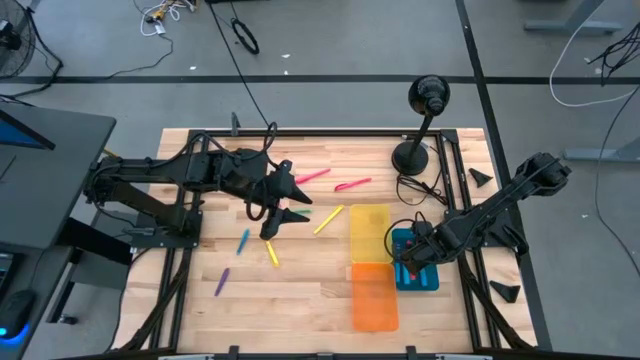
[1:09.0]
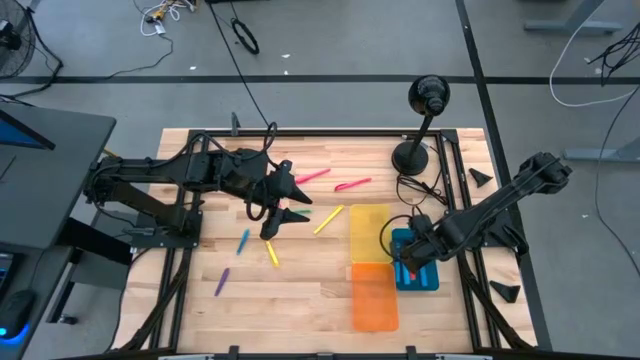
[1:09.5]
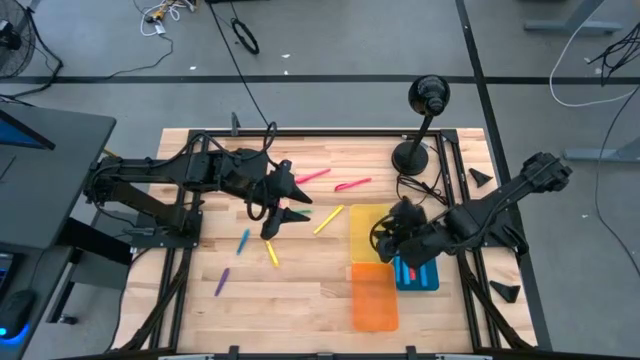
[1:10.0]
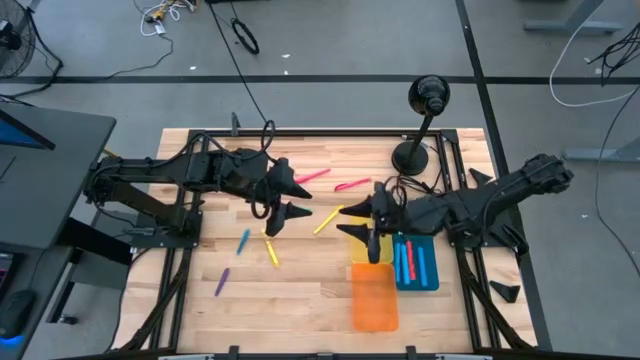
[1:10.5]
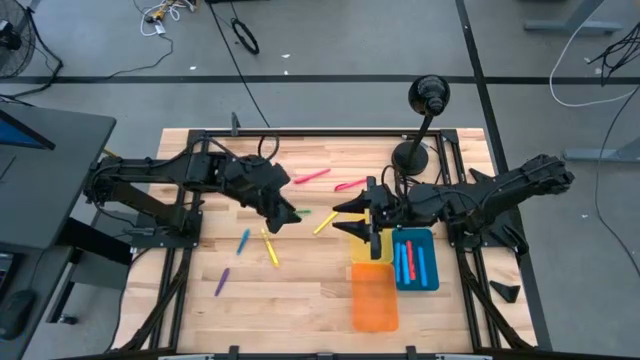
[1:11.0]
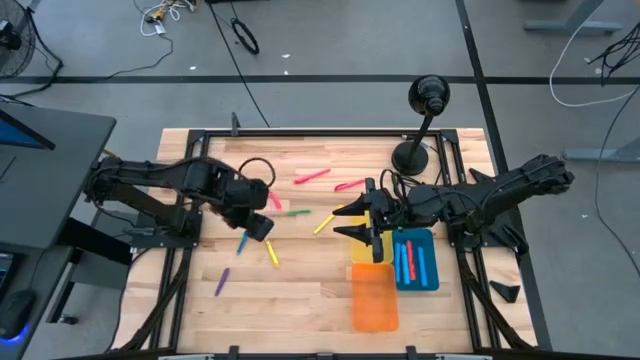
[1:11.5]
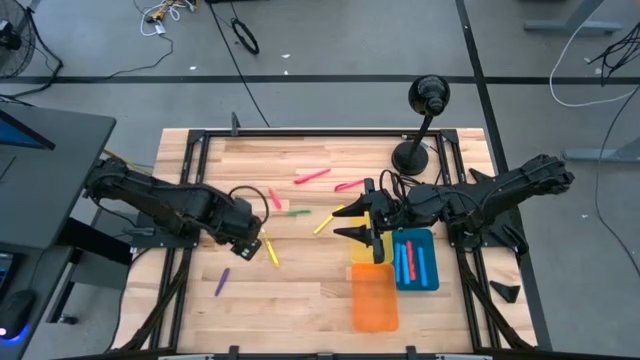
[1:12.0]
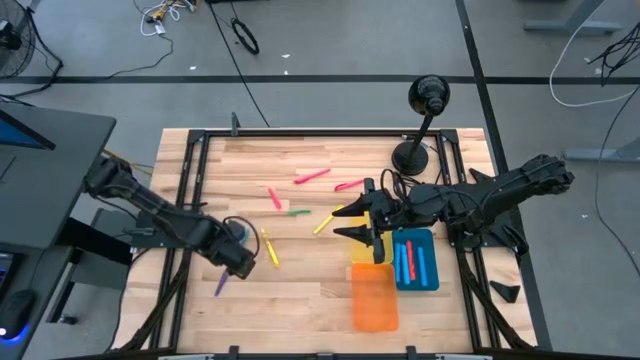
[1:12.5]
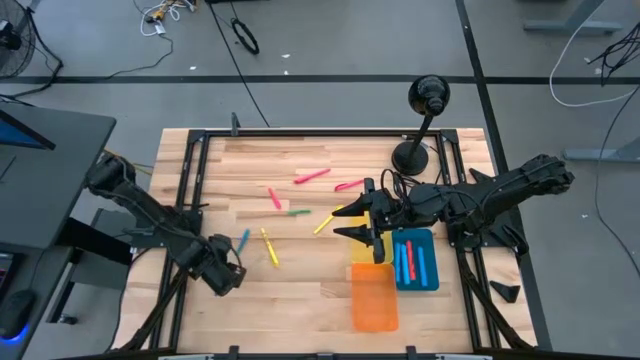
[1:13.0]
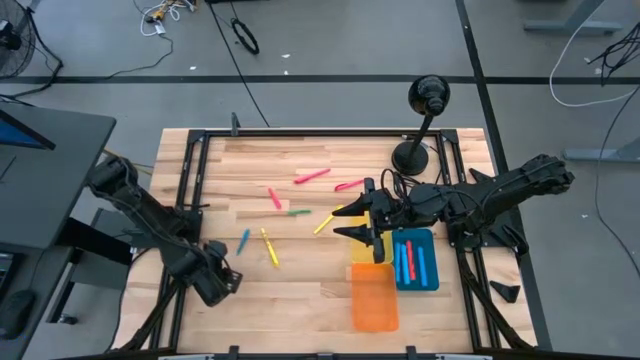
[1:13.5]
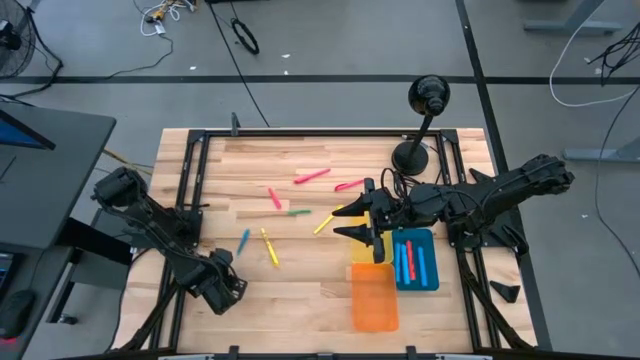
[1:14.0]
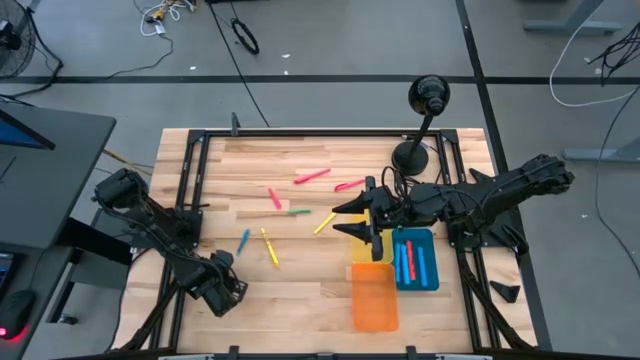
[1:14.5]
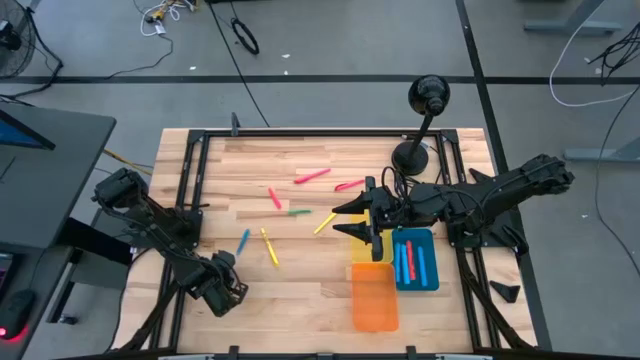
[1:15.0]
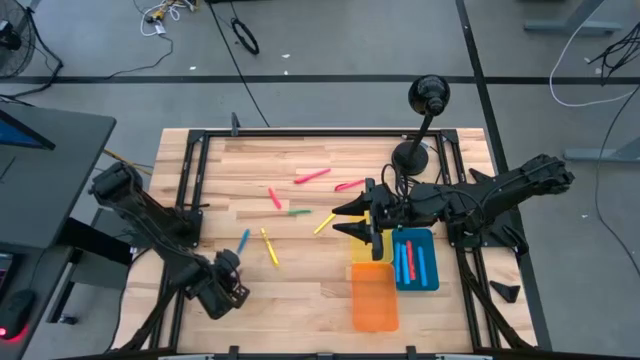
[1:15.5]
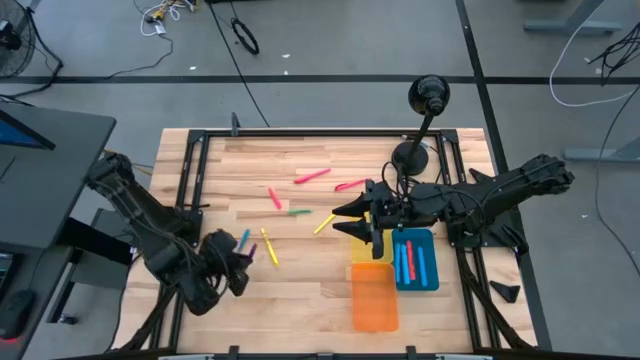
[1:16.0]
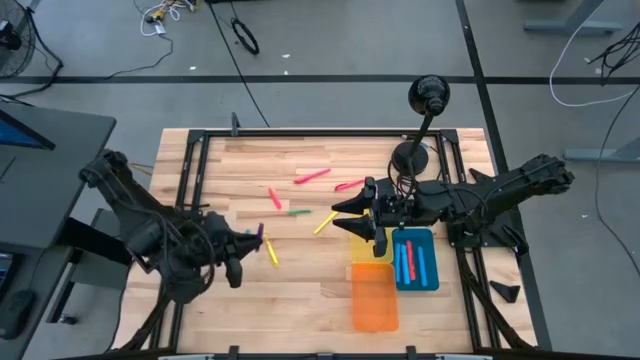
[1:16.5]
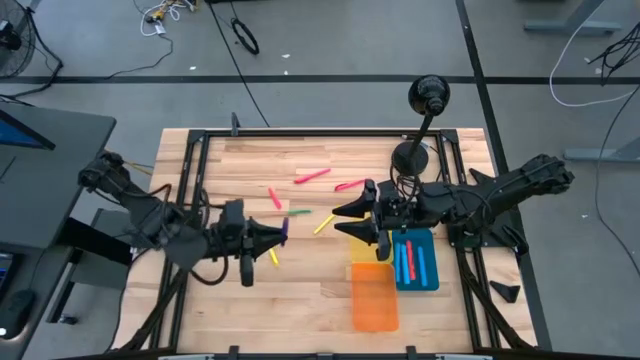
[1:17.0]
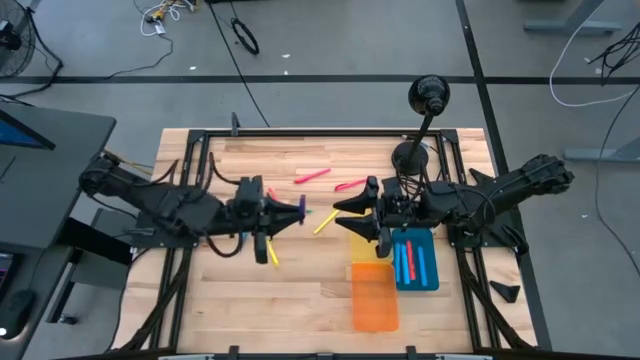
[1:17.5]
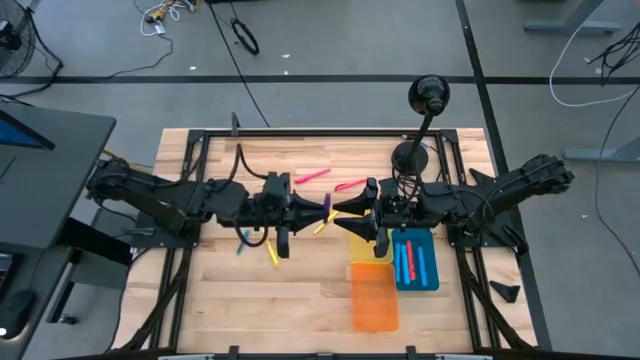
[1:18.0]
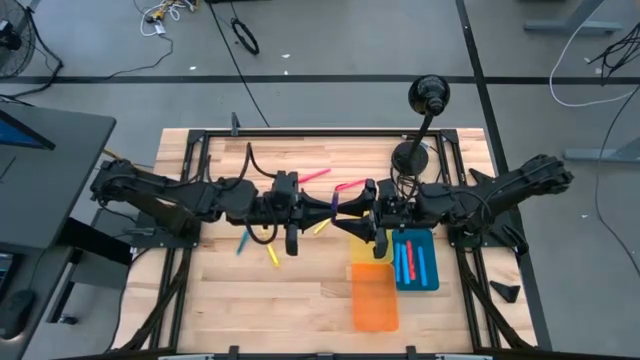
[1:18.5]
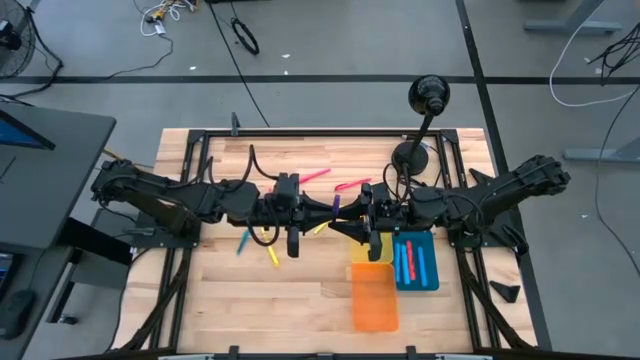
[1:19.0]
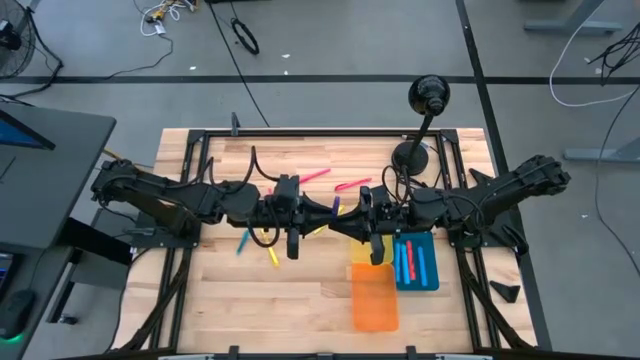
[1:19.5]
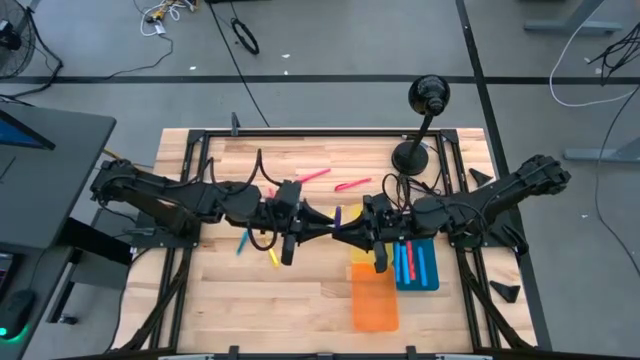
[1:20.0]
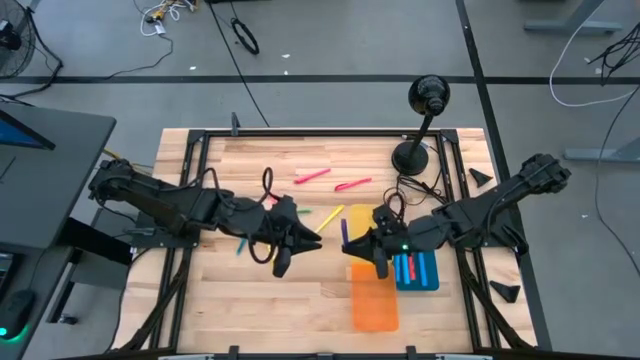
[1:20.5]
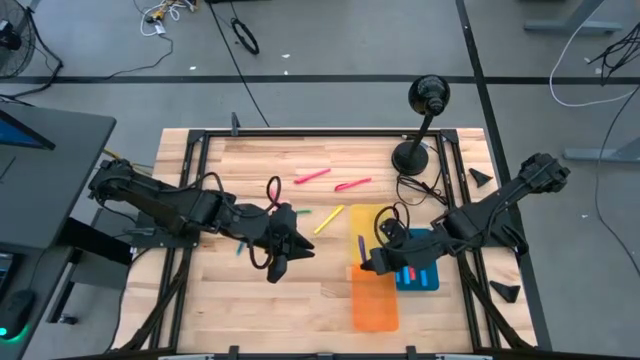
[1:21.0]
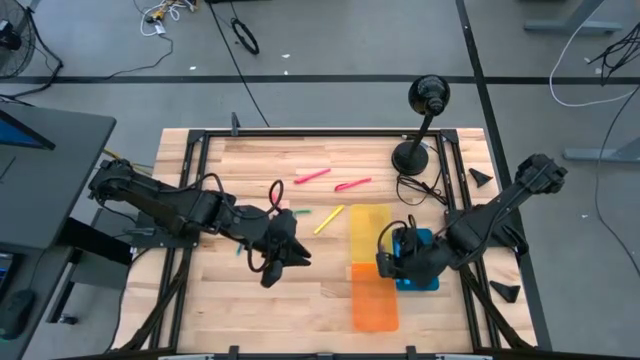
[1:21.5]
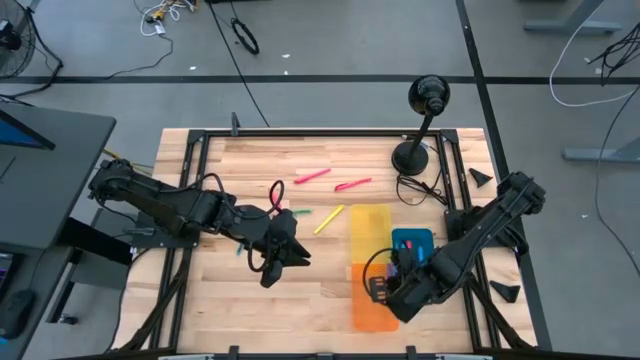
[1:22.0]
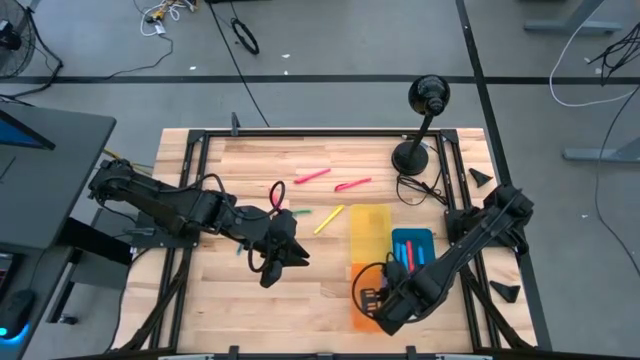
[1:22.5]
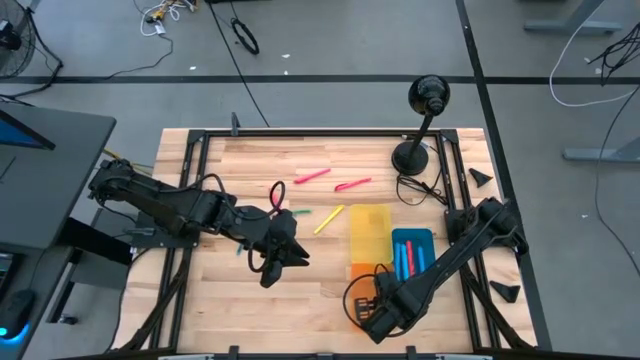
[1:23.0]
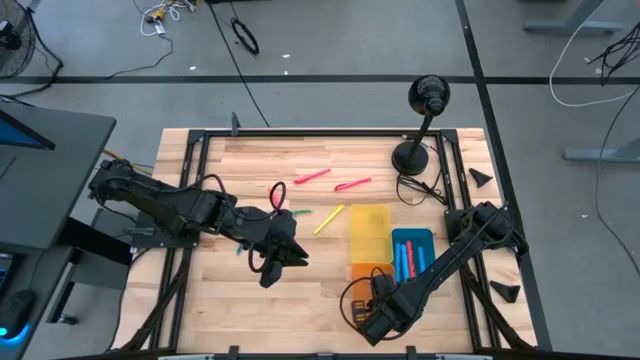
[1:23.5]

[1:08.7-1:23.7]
Task: Pick & Place Markers
Put the purple pen into the orange bin

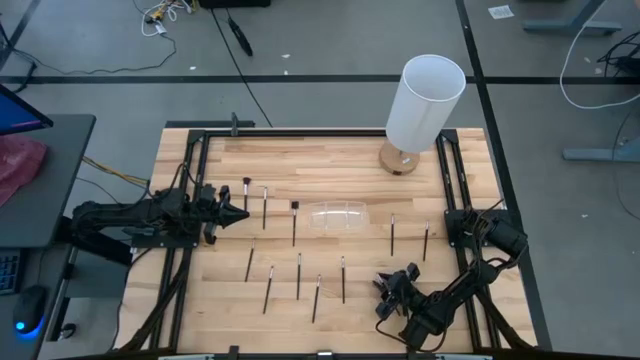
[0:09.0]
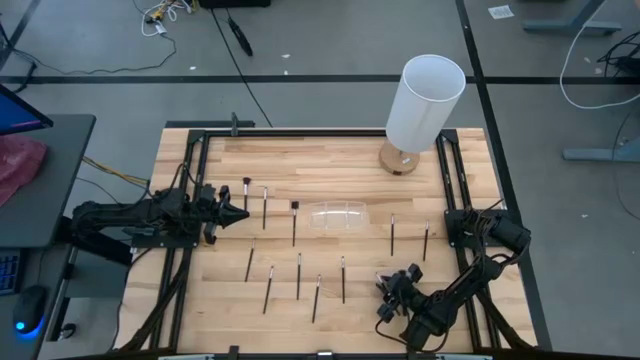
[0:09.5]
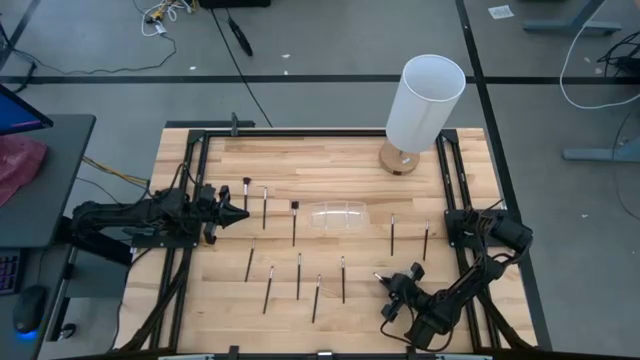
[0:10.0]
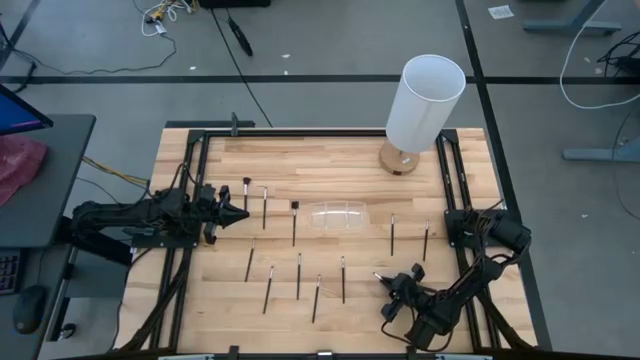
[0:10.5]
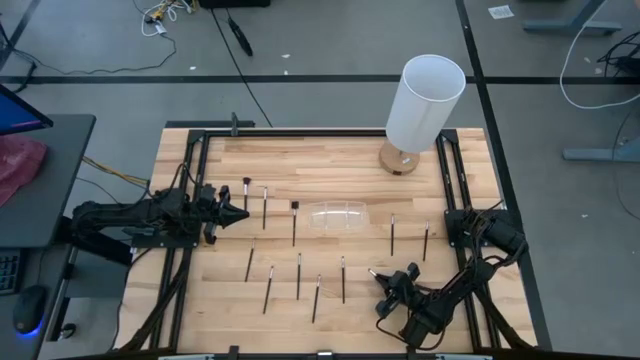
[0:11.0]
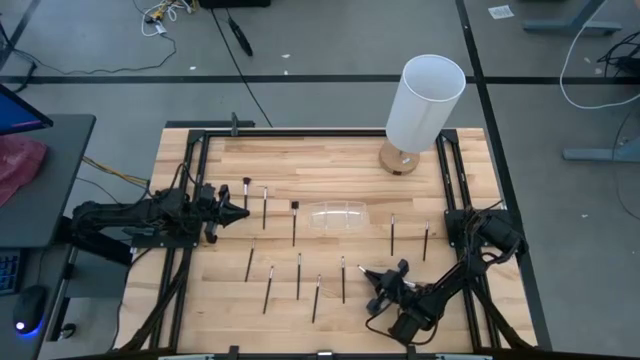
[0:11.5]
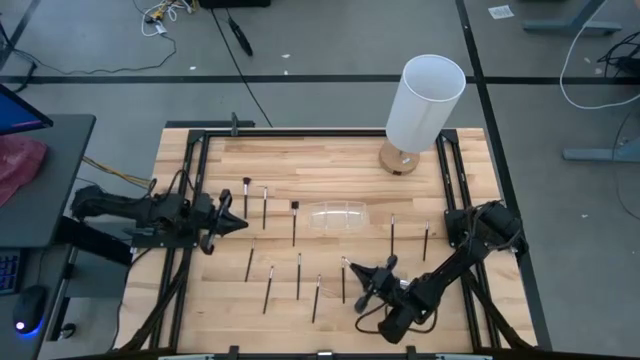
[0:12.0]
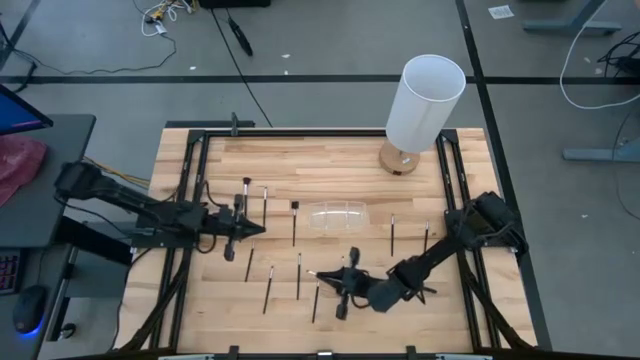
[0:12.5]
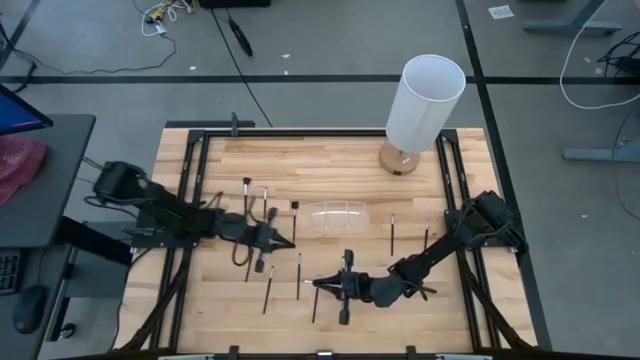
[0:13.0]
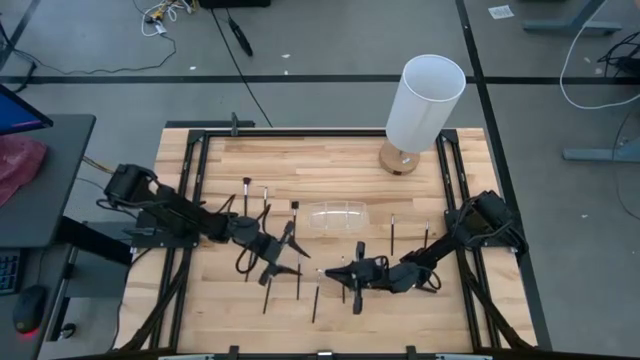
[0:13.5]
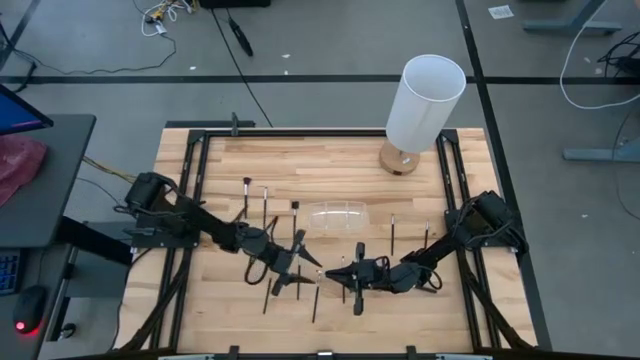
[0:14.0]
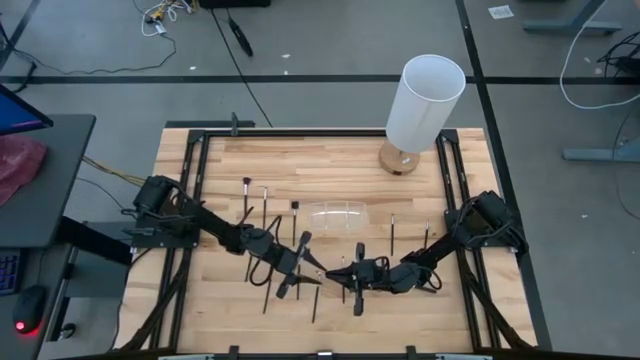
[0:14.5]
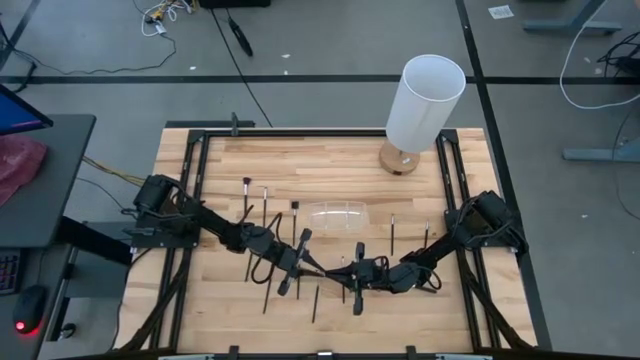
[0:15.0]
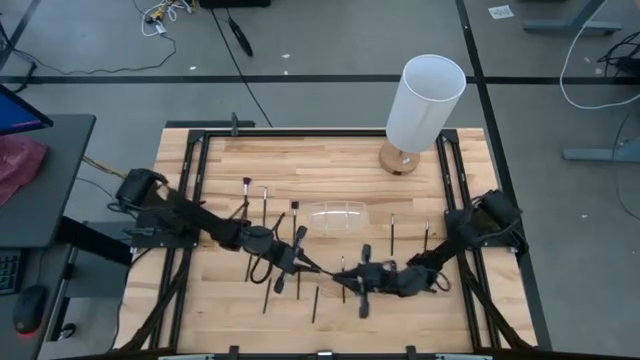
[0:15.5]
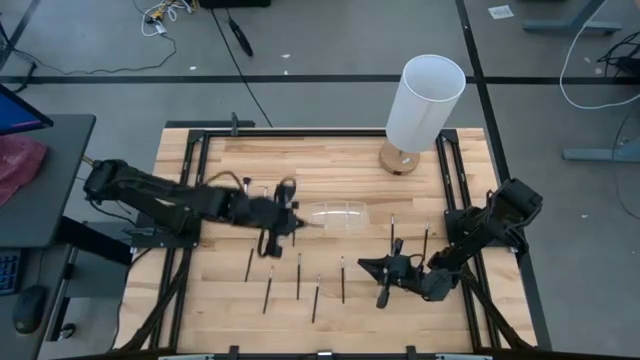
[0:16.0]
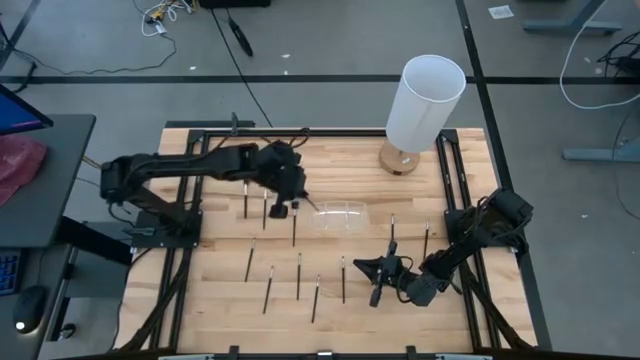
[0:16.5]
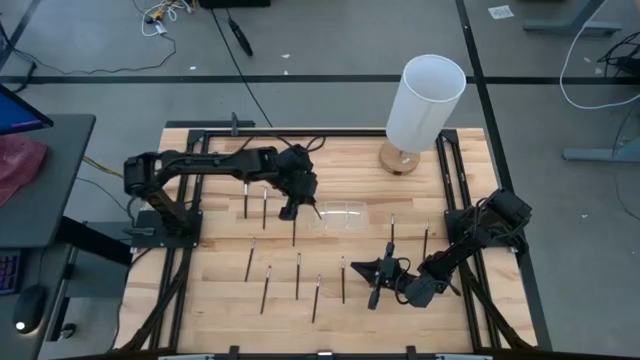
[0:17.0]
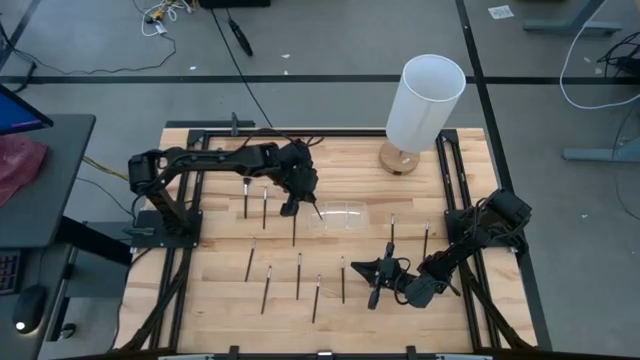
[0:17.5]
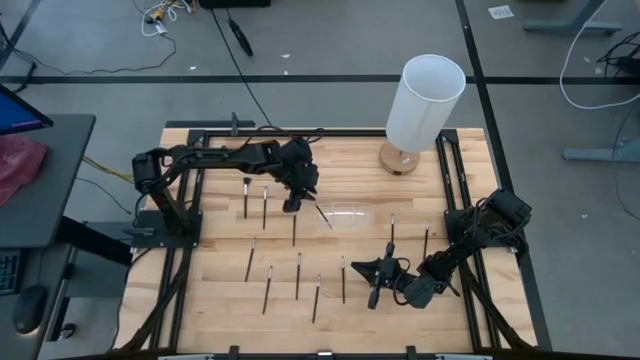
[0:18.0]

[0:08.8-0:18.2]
Task: Pick & Place Makeup Supplies
Put the black makeup brush into the transparent organizer
